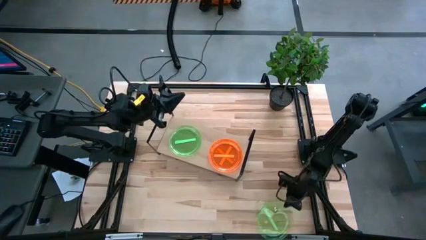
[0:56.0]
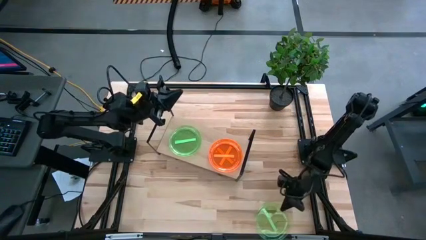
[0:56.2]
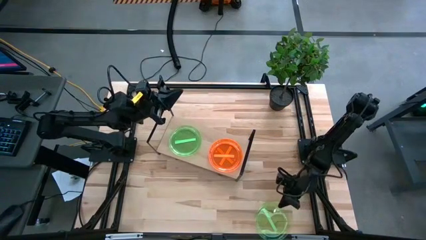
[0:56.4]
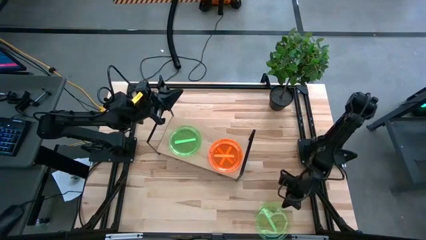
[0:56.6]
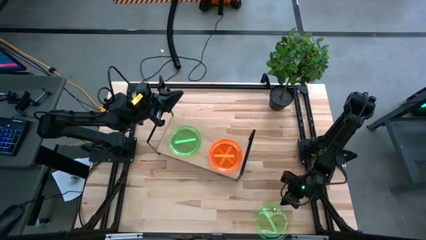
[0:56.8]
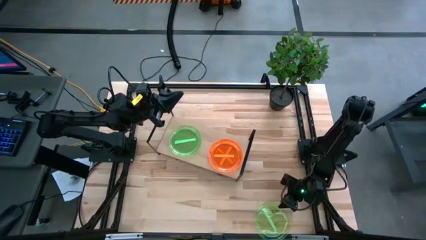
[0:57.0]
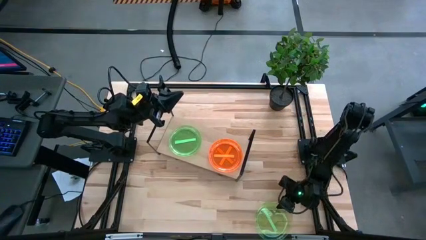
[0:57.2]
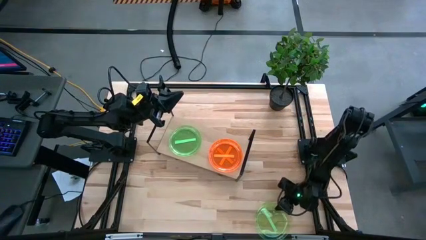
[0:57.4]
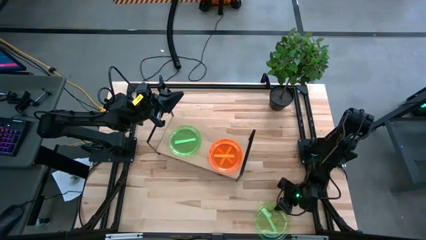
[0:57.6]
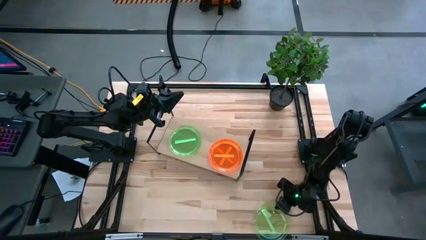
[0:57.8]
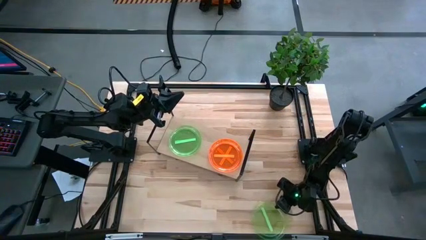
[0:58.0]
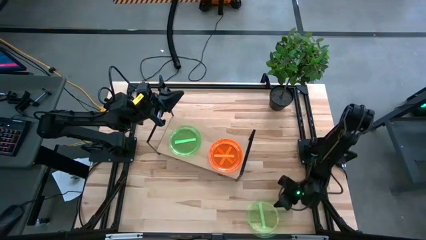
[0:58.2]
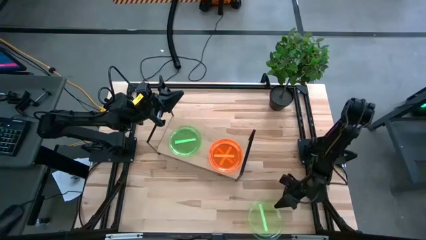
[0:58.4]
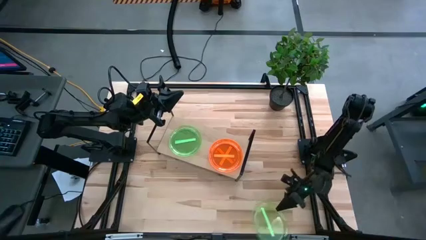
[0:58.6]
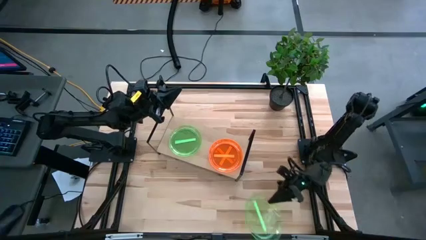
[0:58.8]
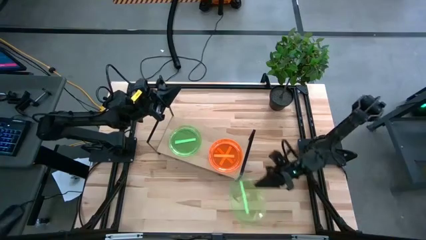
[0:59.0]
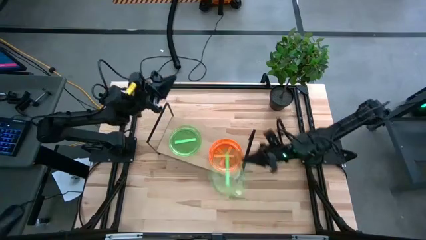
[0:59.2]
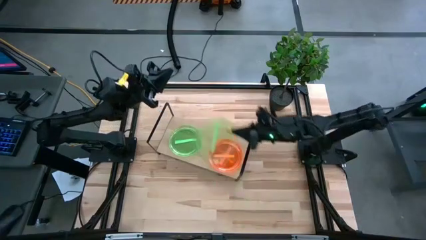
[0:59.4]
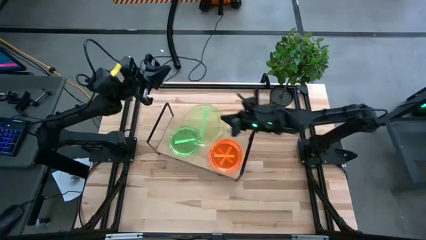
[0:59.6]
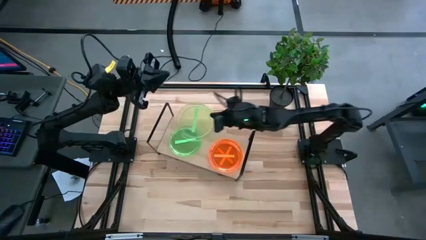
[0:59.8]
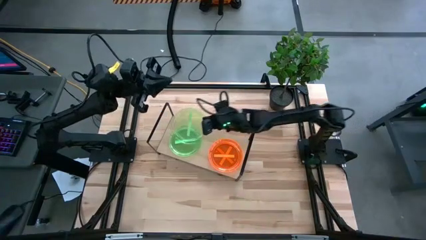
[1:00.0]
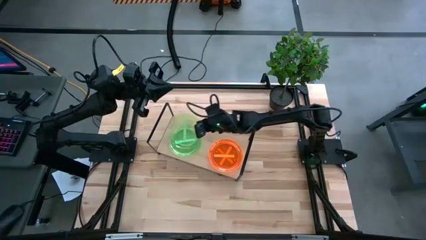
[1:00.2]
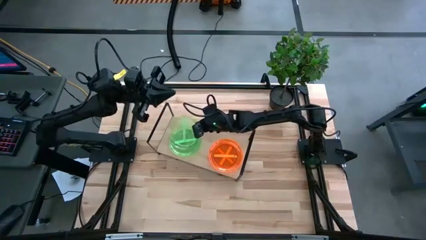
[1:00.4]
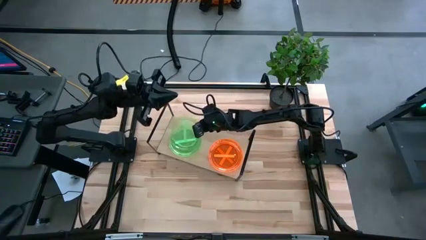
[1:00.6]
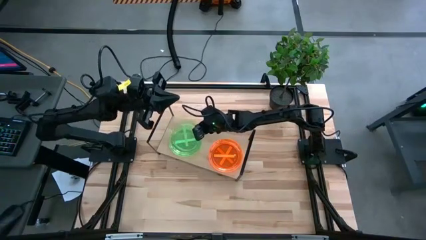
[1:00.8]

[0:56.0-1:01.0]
Task: Place and stack plates onto a shelf
Stack the green plate on the top of the green plate on the shelf

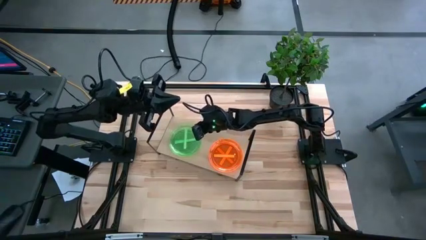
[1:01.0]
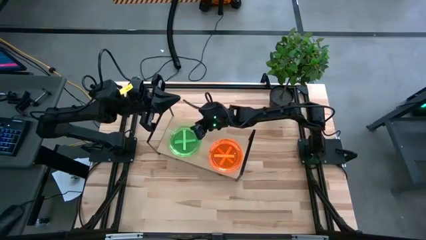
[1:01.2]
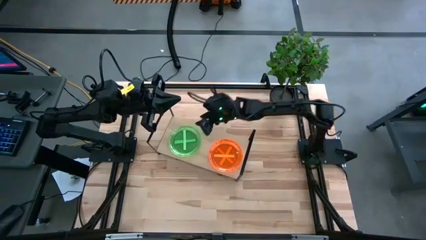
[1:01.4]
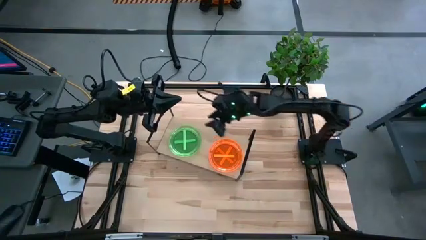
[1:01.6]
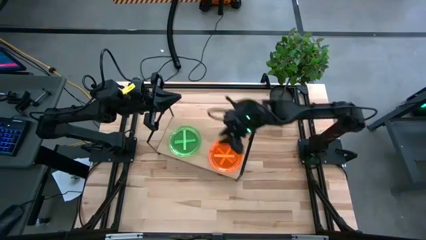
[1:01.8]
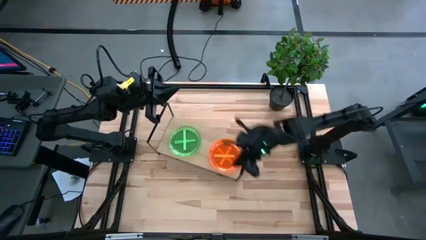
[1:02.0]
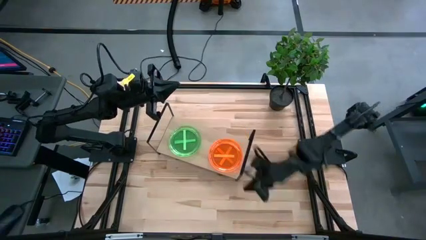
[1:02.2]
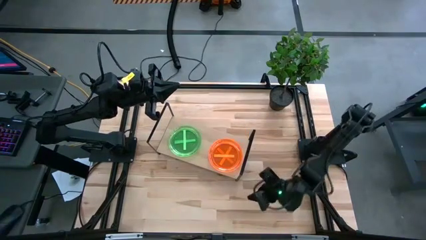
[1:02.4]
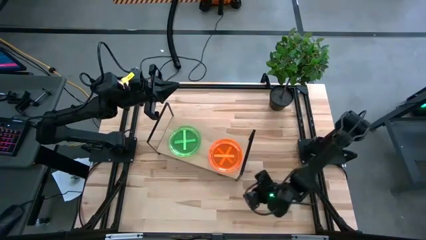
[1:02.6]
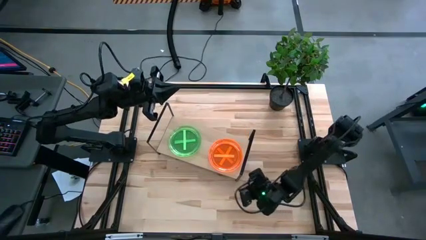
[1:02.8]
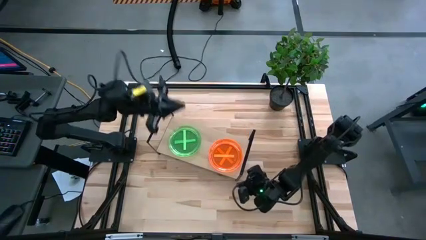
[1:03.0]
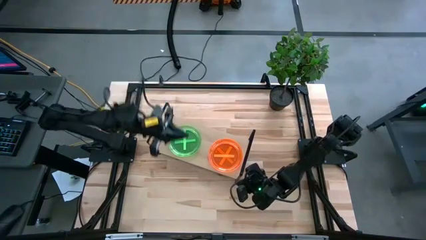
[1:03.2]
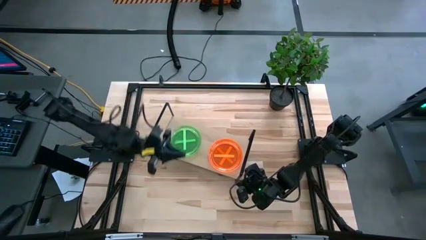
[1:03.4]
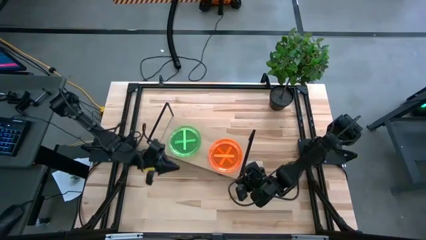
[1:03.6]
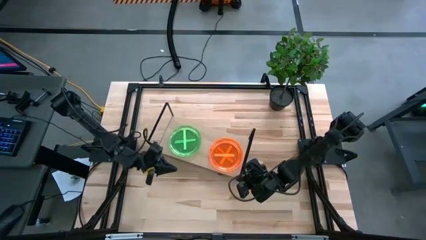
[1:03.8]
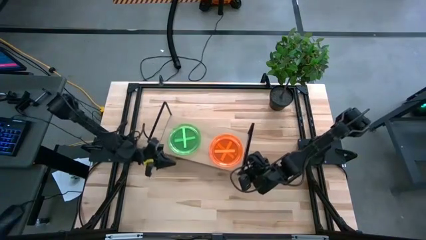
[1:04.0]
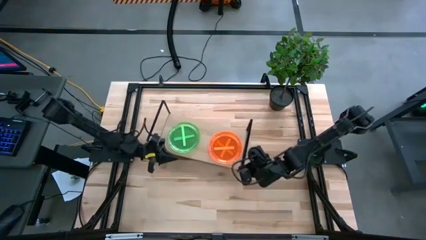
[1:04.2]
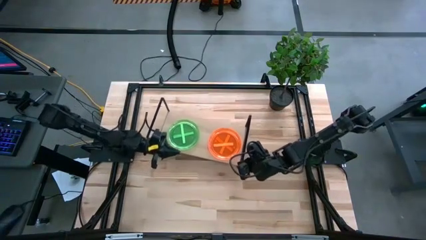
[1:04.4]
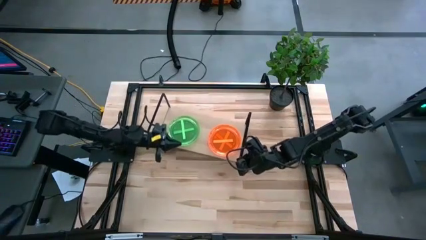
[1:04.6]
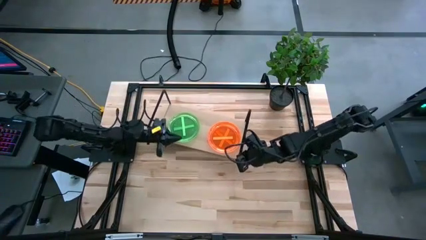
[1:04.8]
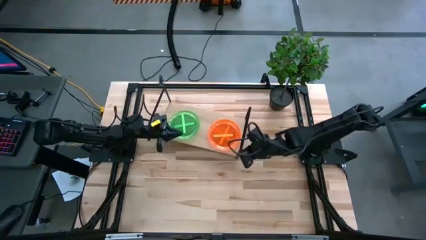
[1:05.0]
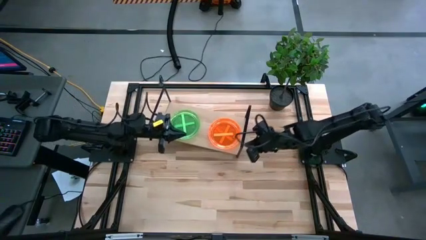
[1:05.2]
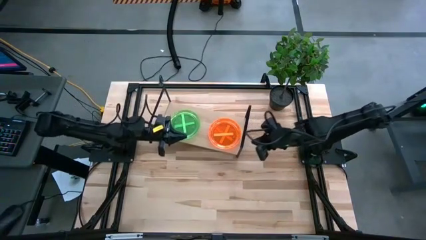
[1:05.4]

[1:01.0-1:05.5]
Move the shelf to the top center of the table

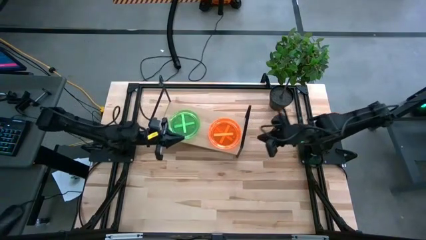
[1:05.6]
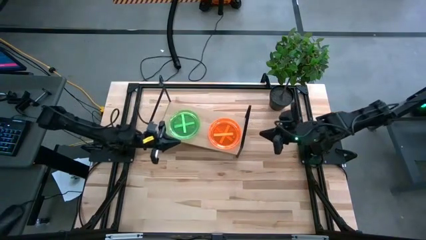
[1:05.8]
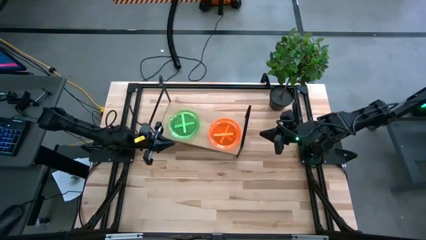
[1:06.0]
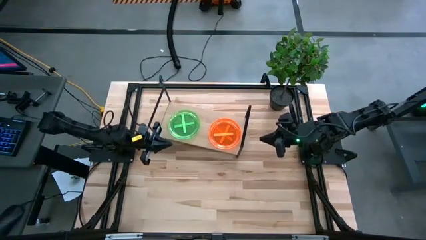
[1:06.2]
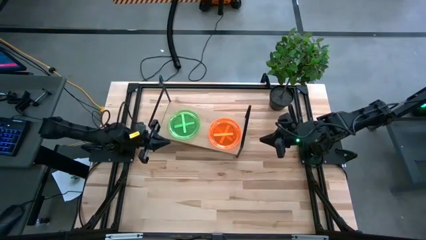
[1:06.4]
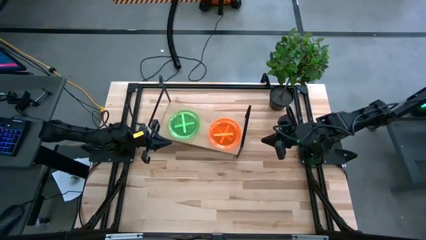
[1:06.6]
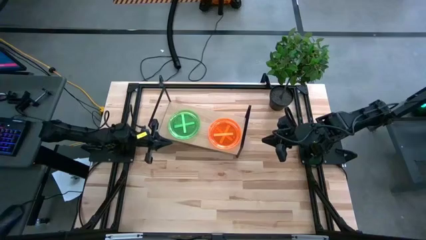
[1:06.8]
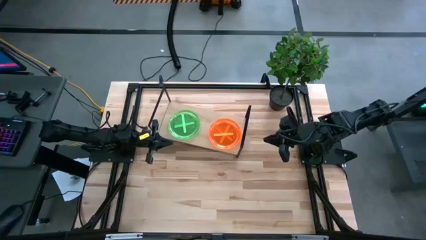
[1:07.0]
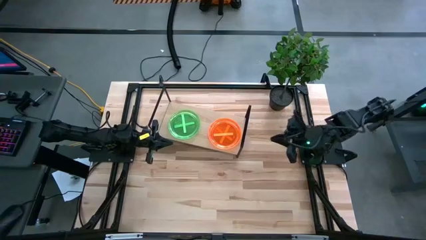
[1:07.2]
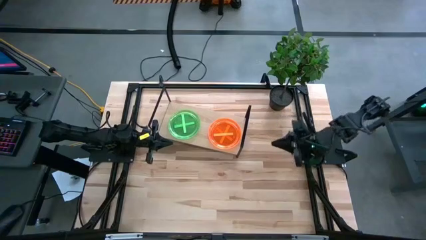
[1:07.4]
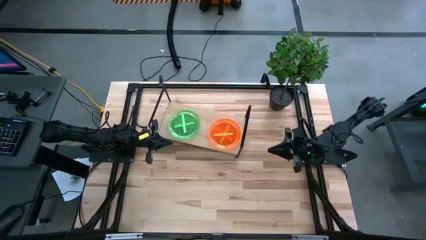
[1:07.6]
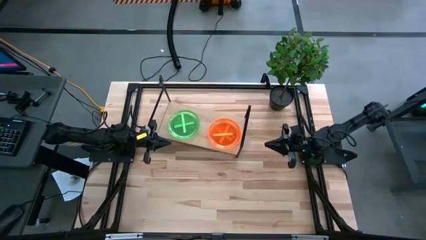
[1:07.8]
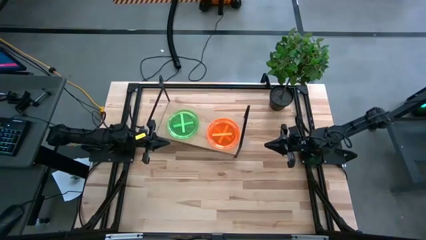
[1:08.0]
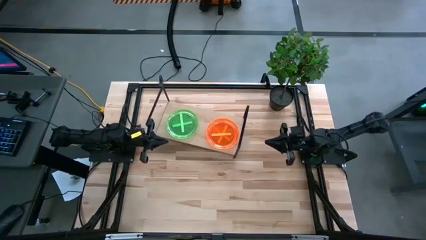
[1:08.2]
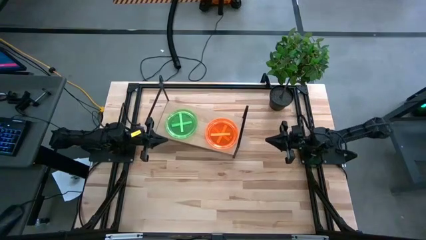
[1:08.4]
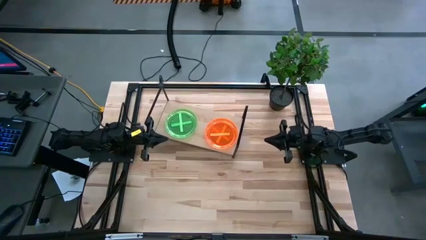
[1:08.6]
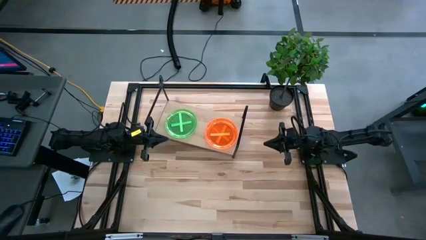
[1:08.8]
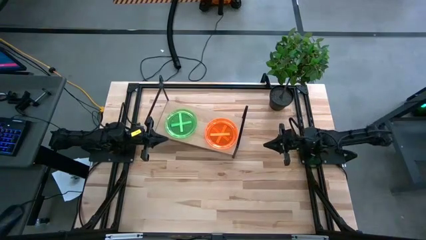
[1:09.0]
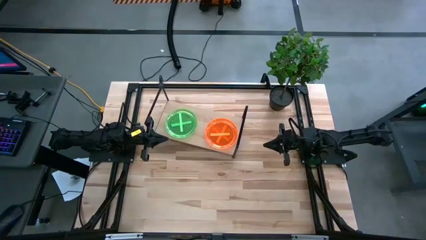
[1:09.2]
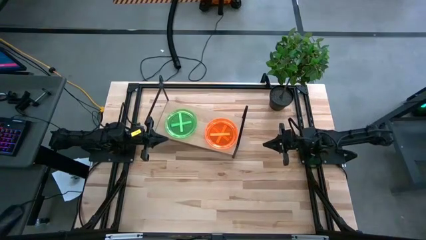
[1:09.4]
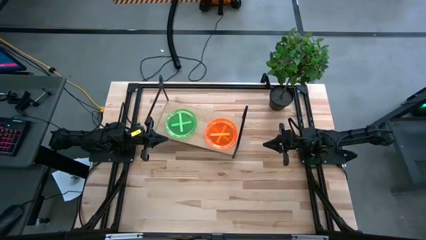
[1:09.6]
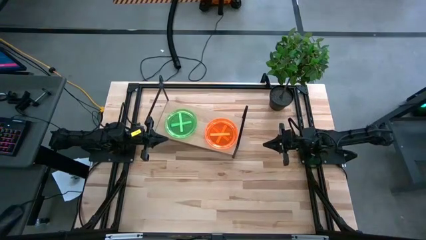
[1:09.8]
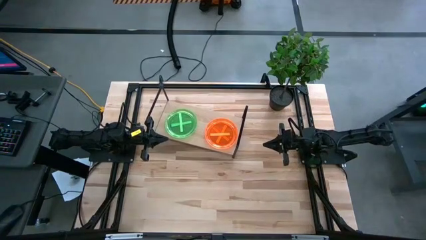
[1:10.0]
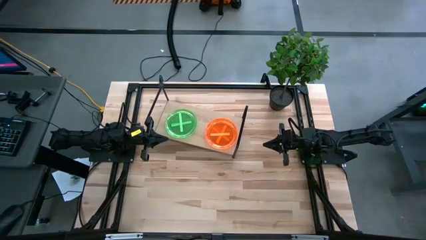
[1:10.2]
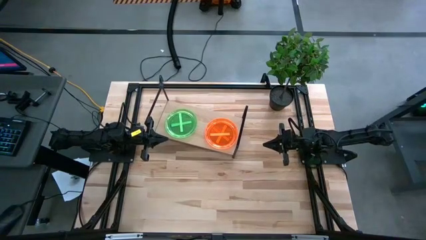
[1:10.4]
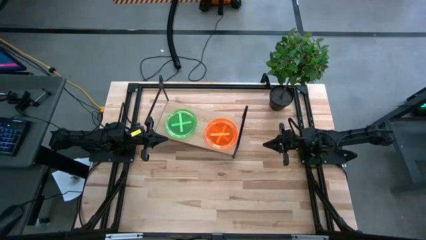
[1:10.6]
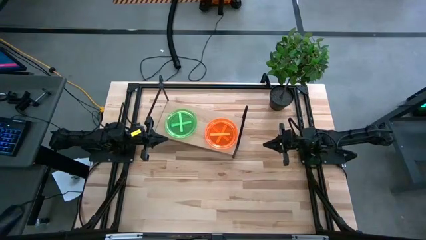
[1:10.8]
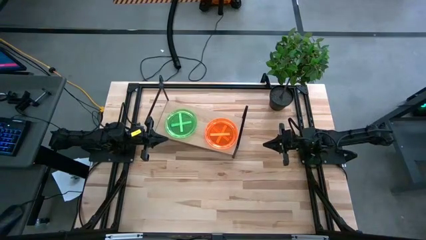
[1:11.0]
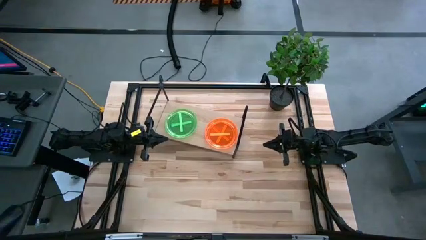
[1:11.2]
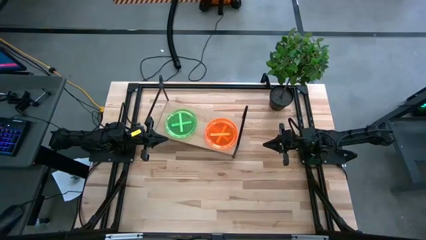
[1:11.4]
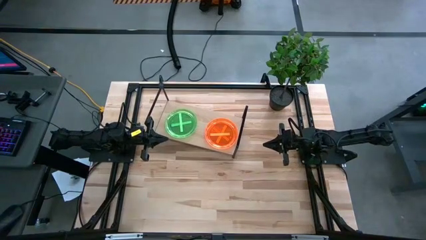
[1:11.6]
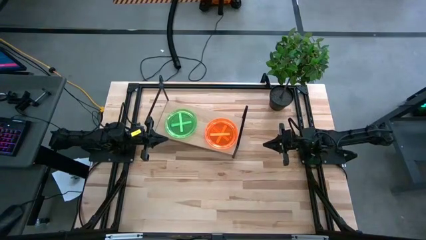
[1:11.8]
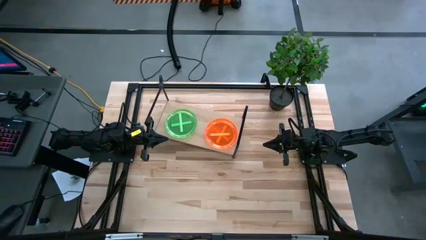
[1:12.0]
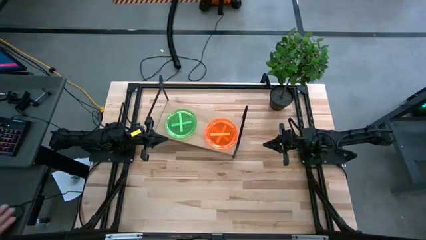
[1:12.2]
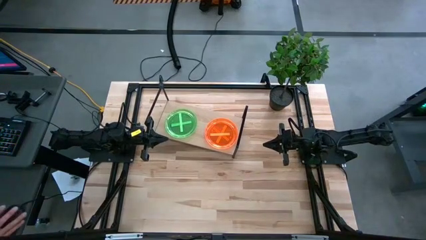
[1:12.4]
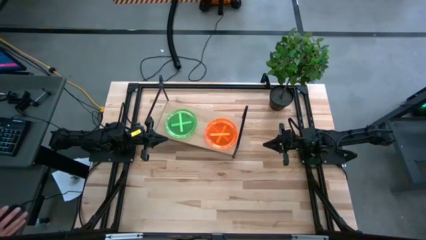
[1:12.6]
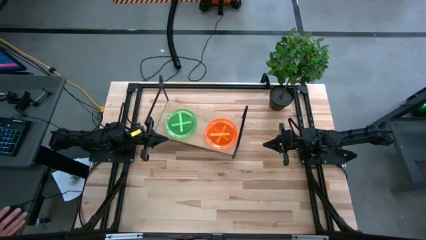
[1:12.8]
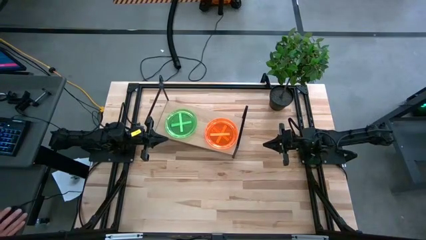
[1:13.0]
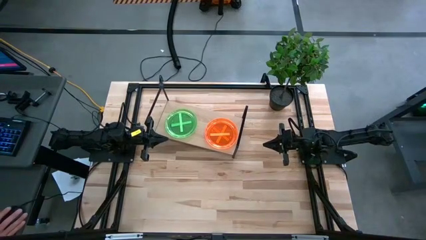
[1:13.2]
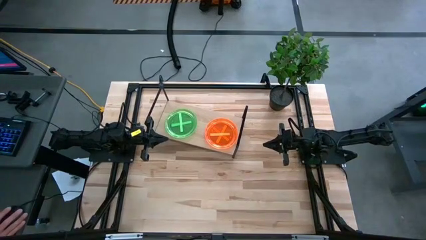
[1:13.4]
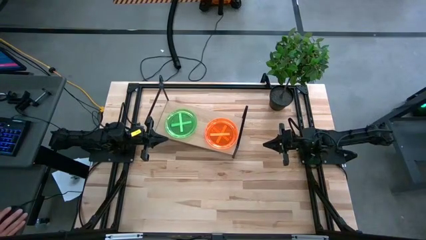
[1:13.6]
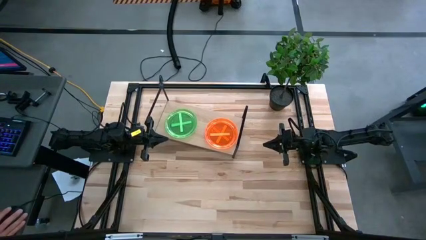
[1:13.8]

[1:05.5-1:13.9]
Return to Home Position
